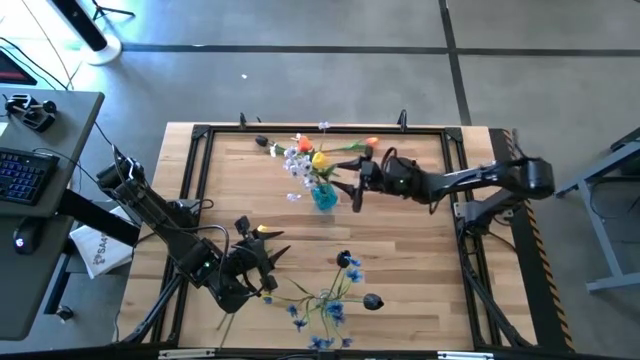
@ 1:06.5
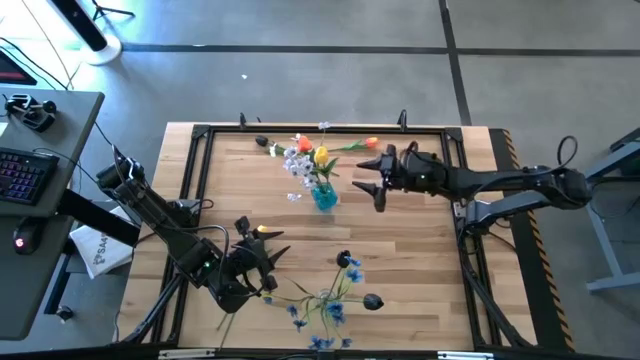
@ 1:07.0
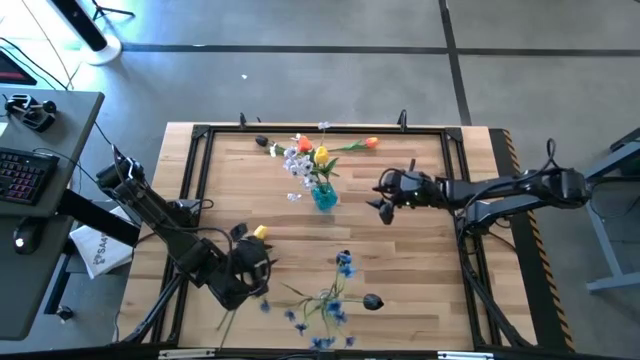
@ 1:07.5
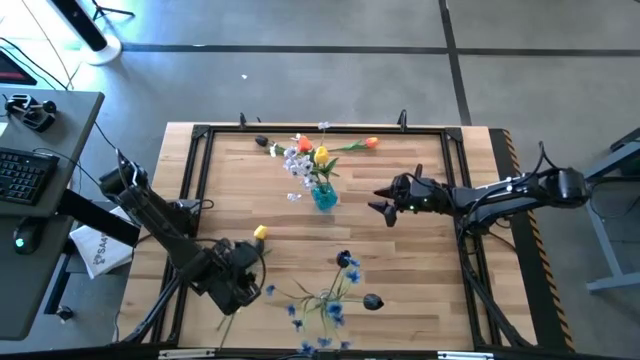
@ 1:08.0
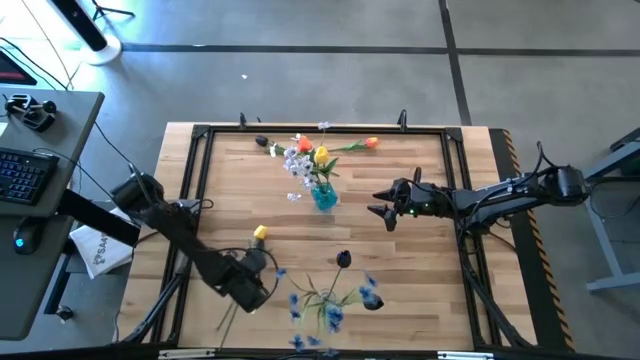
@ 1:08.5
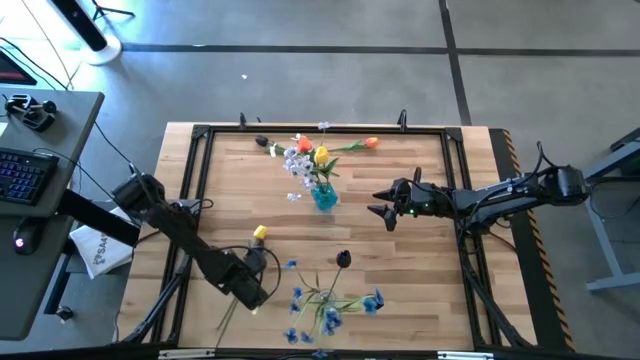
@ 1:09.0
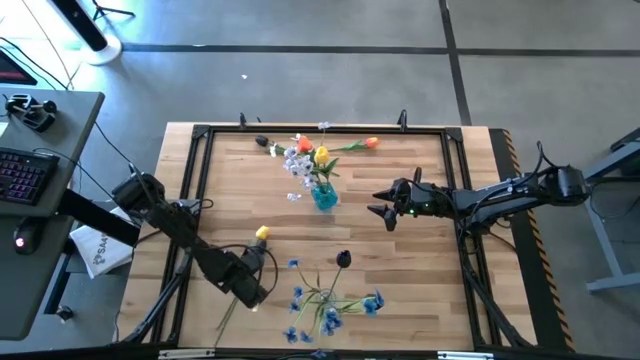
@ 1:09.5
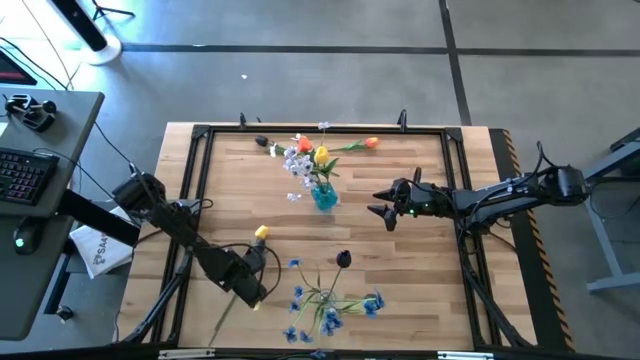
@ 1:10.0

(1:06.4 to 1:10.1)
Task: Sort flowers into vase by color
Put the bottom black tulip into the transparent vase

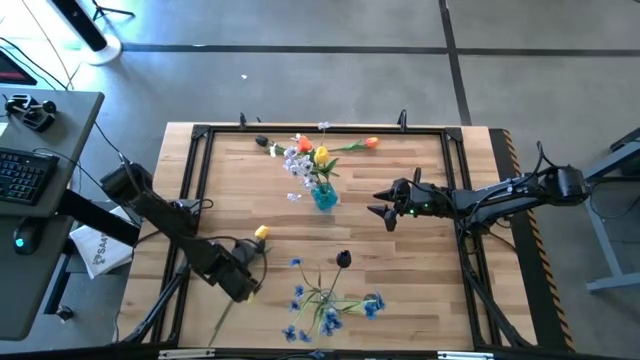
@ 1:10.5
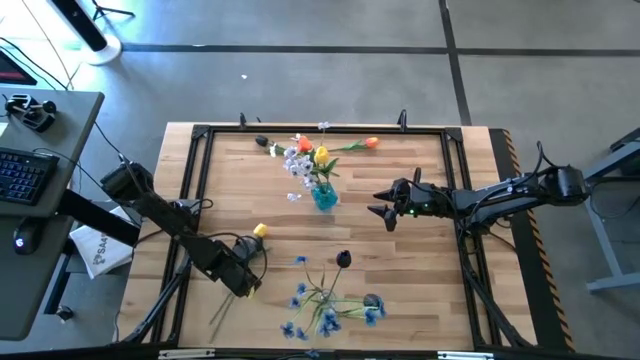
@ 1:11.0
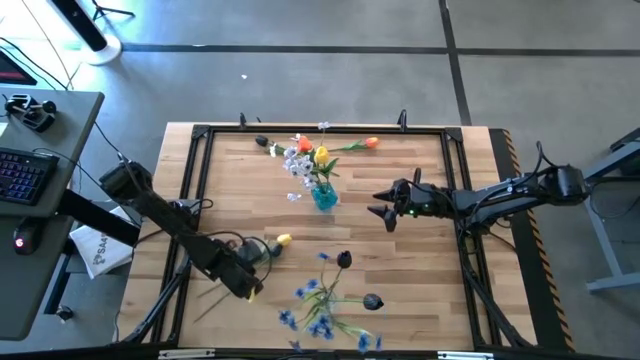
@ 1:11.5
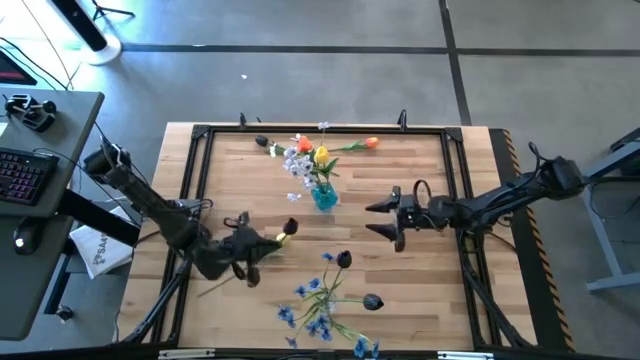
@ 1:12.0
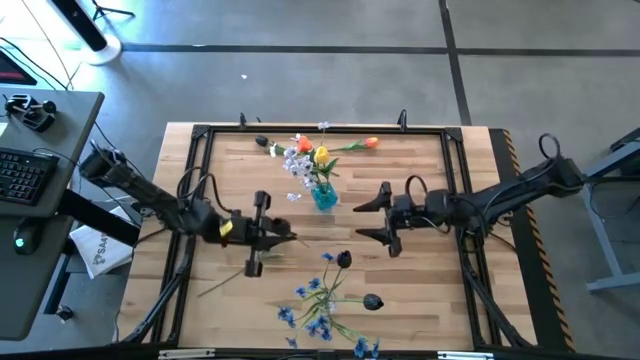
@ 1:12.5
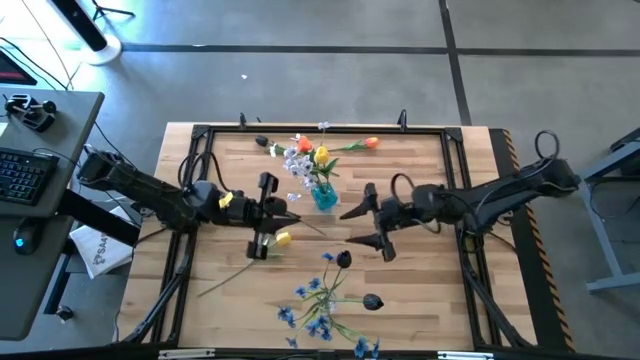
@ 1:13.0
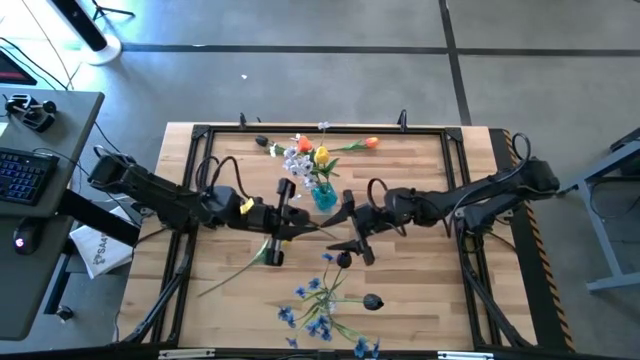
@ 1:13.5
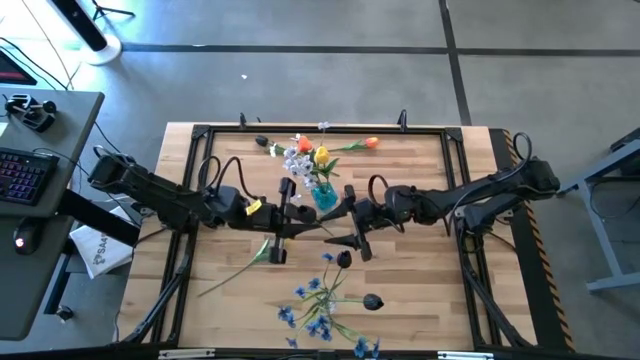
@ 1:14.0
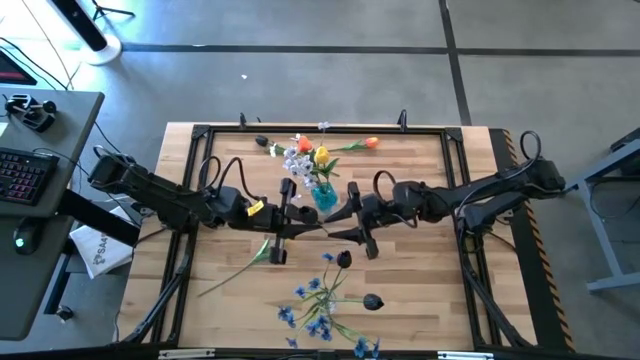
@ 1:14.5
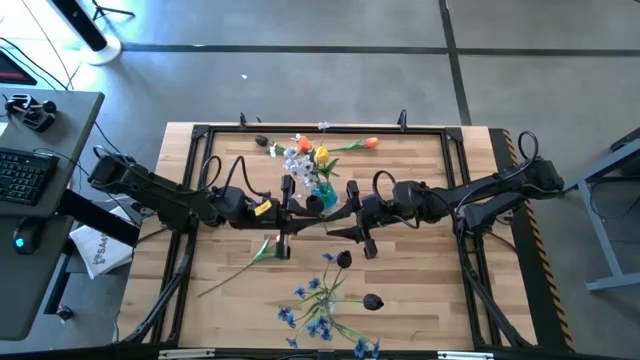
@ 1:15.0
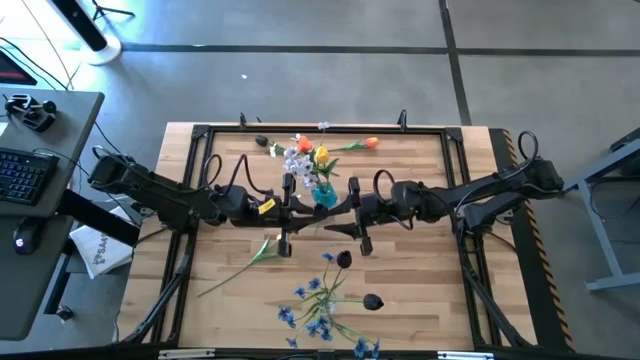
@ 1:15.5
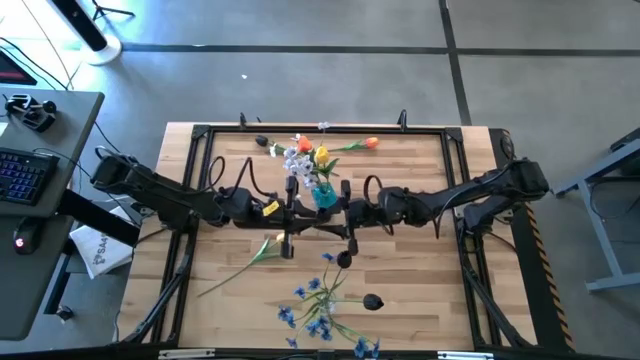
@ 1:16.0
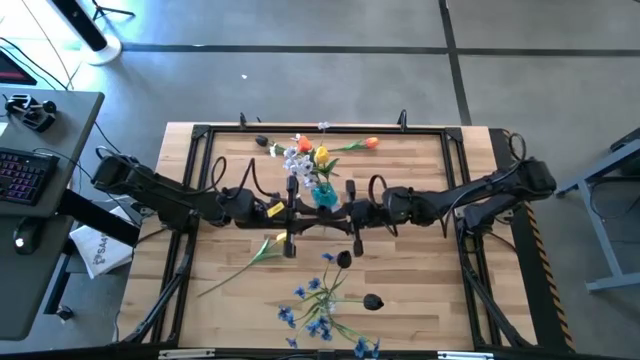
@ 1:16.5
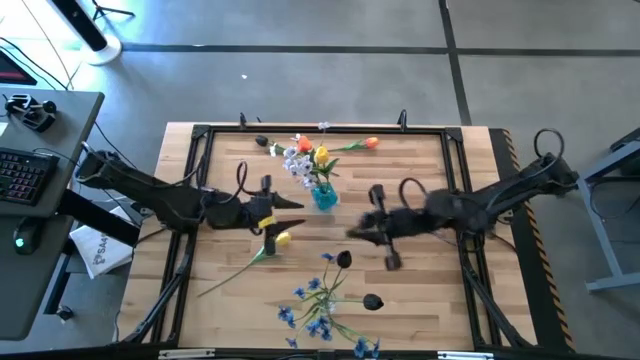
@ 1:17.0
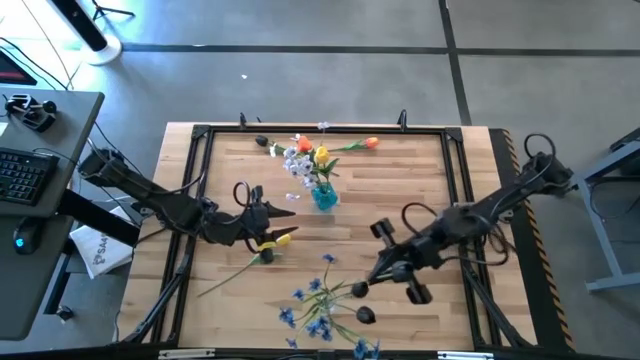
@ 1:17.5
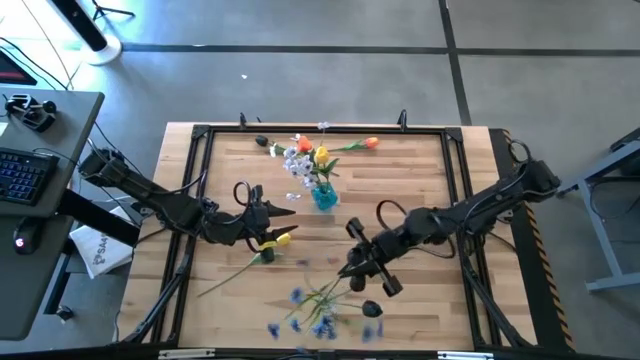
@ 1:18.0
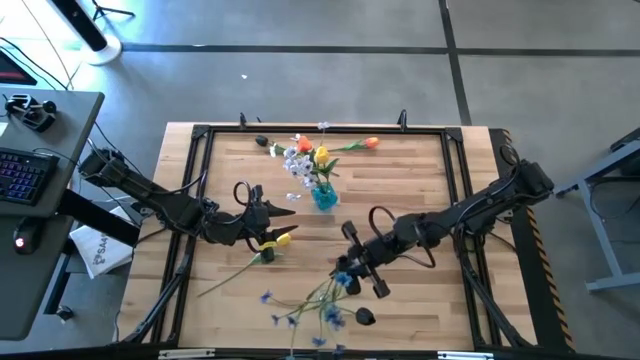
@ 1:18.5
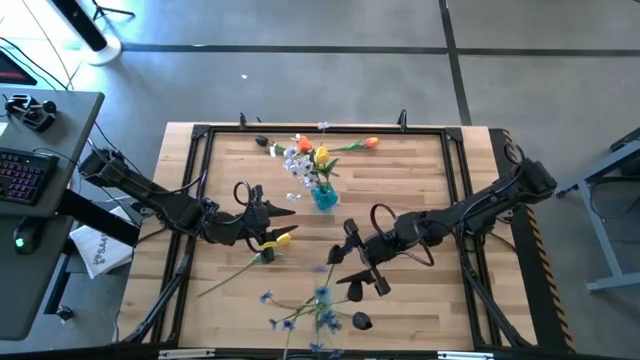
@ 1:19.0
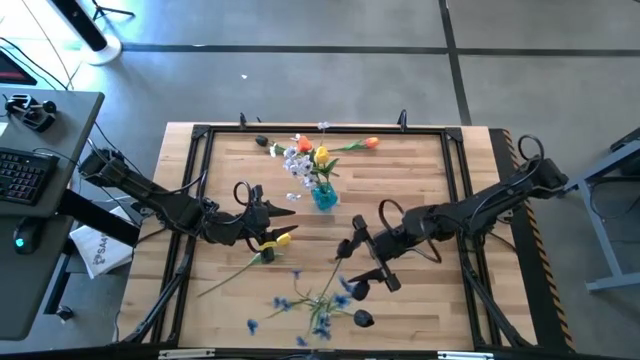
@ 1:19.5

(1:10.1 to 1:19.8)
Put the bottom black tulip into the transparent vase

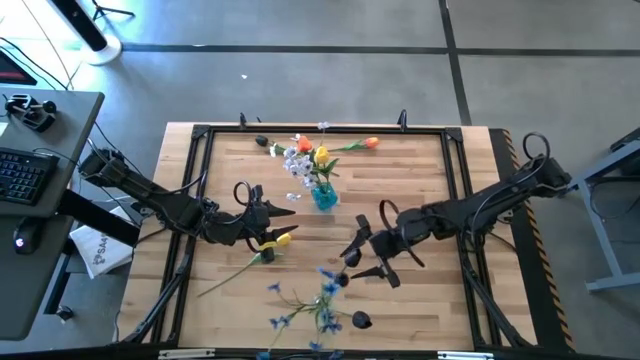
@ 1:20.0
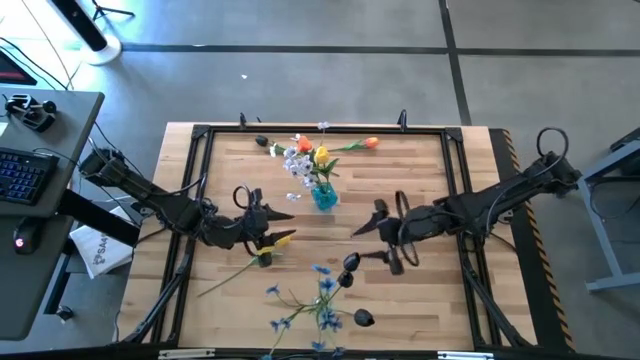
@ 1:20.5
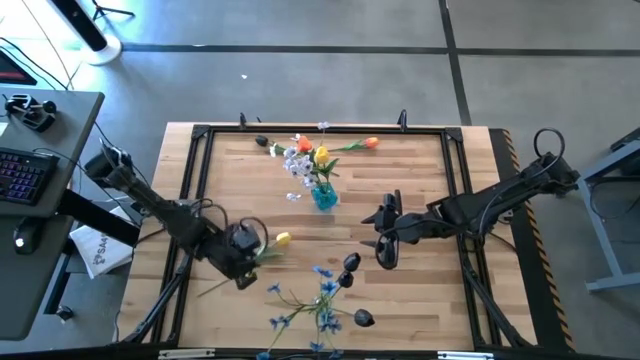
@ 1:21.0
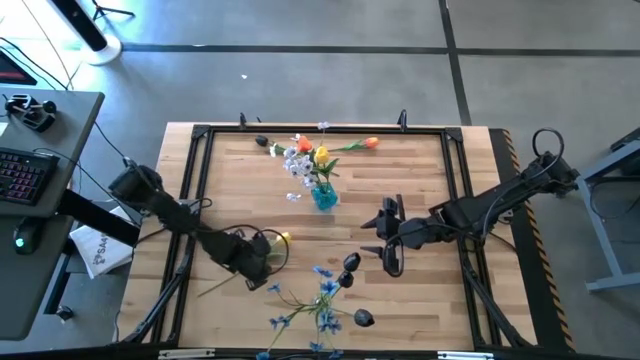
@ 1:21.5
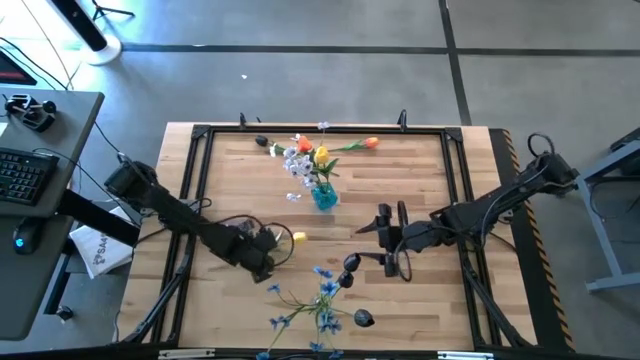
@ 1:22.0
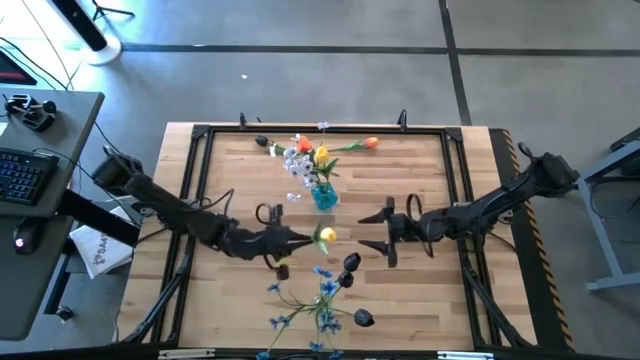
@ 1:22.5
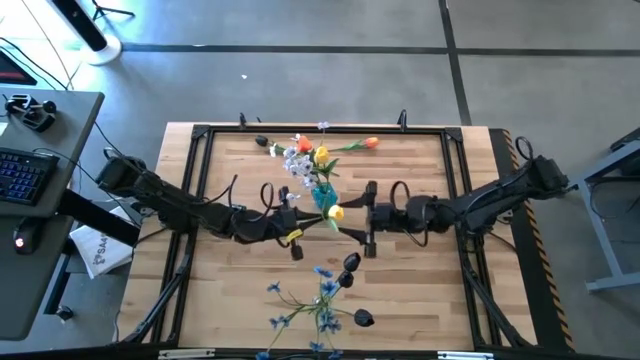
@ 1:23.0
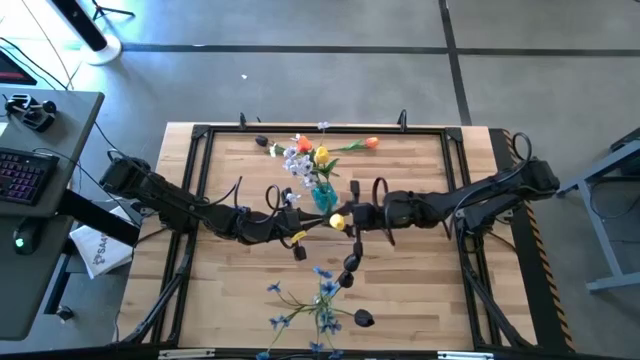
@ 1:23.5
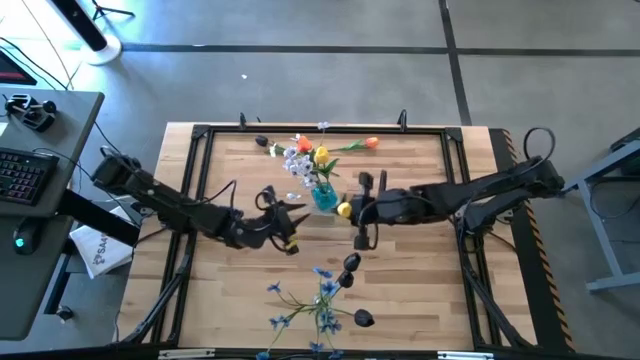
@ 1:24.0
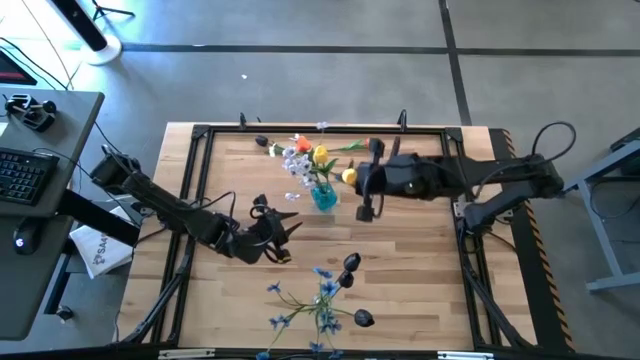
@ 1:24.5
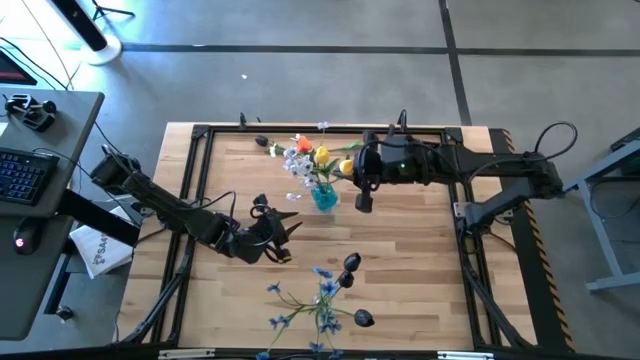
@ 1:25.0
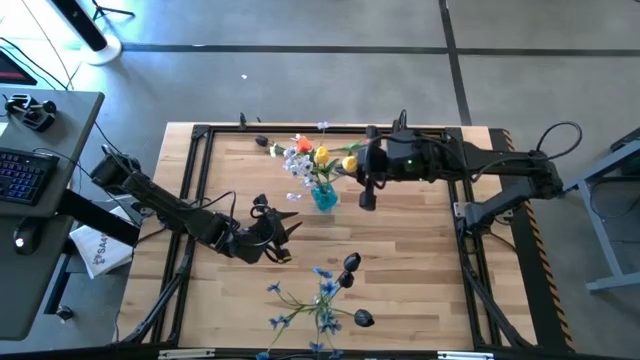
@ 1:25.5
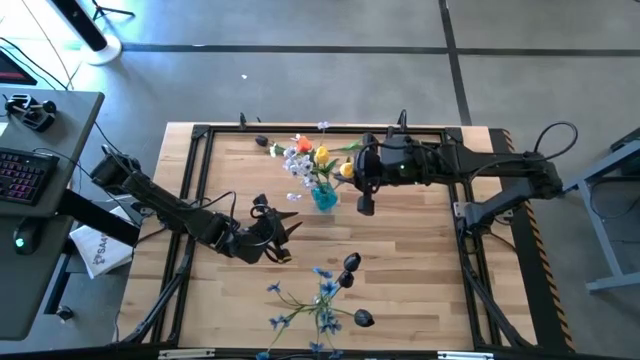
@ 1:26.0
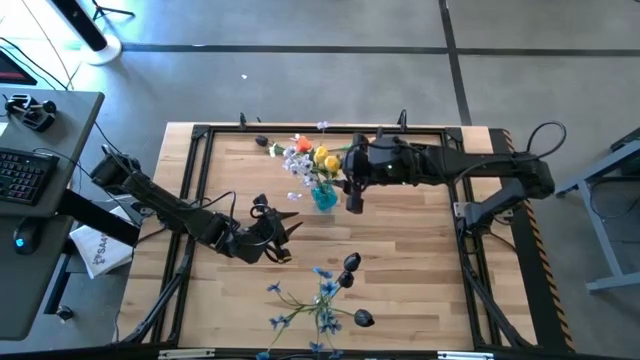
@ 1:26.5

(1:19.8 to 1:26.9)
Put the yellow tulip into the blue vase
